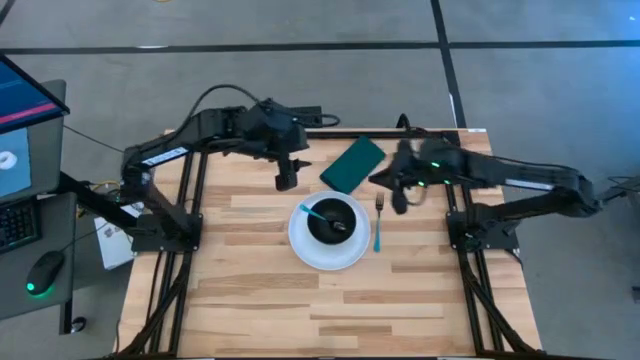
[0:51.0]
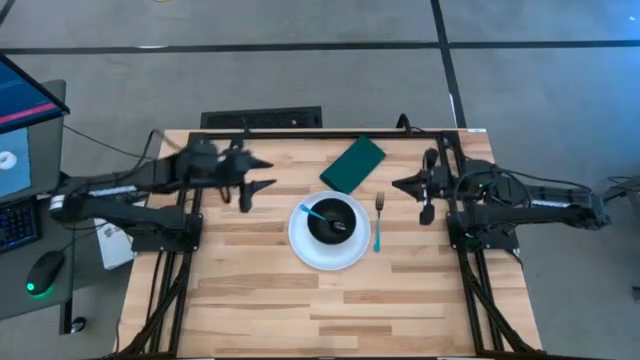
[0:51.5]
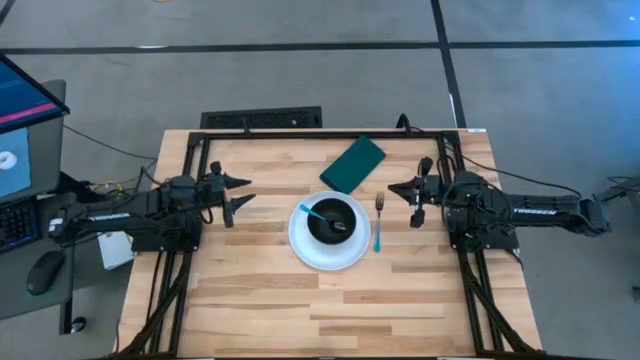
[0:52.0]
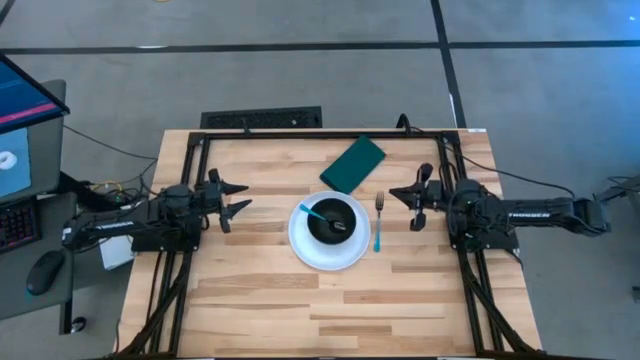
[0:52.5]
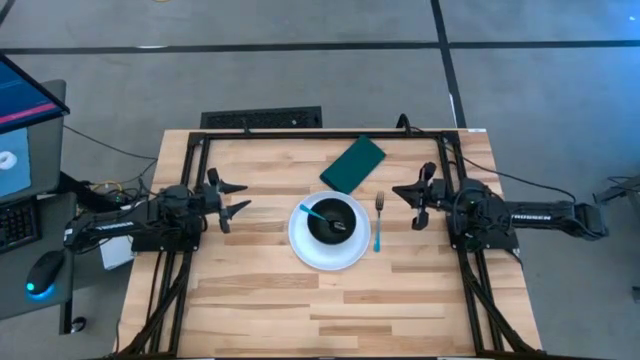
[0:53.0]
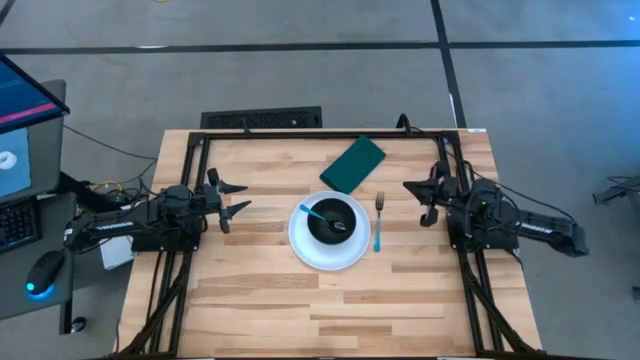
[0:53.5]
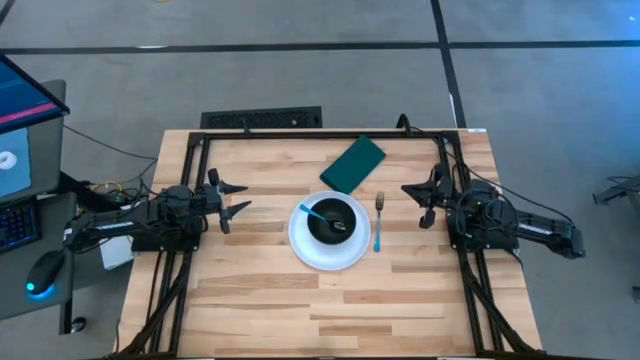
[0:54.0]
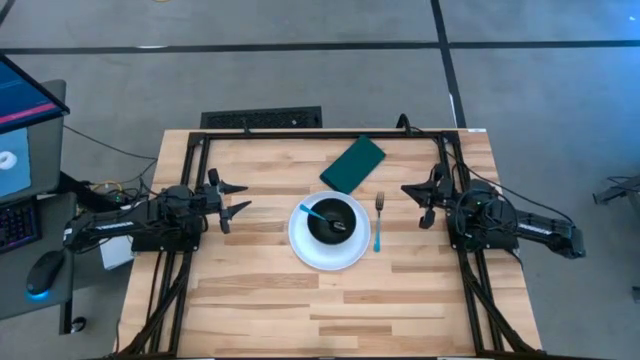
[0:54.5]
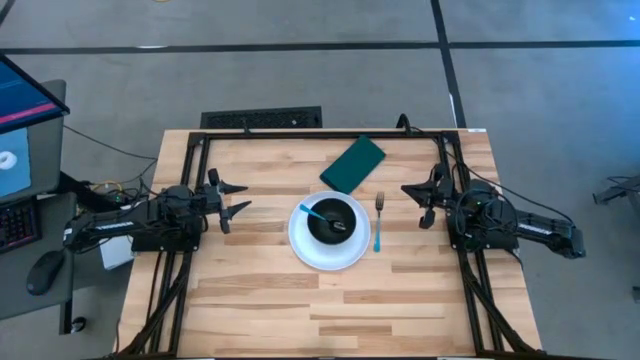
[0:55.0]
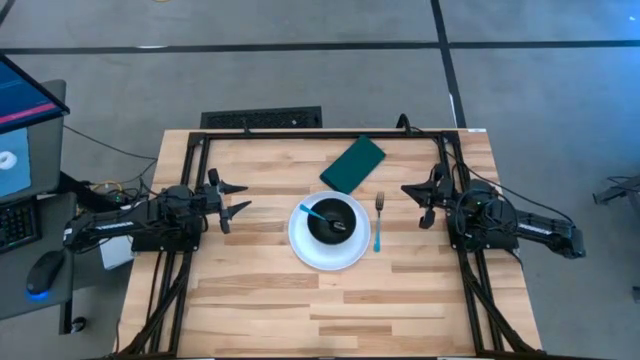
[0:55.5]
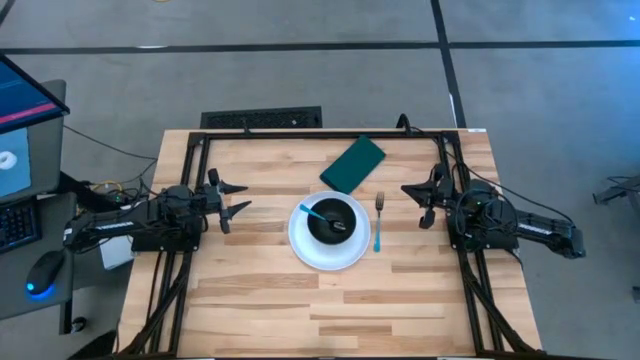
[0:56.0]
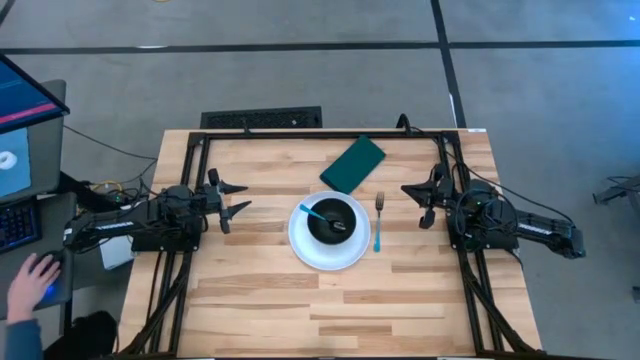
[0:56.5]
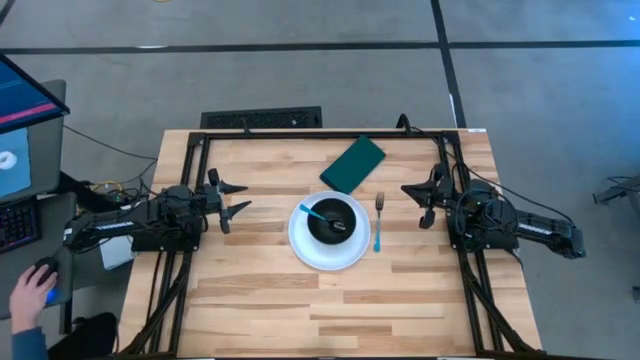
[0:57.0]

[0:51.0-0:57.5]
Task: Set table place
Return to Home Position

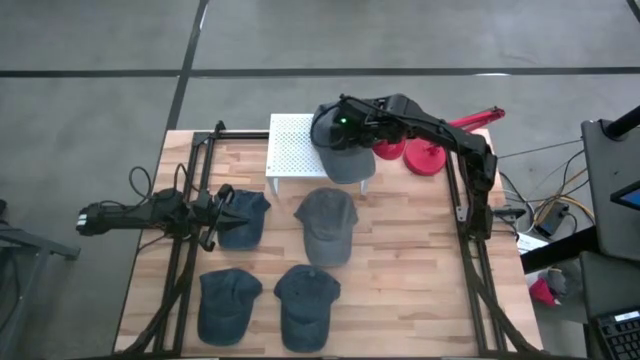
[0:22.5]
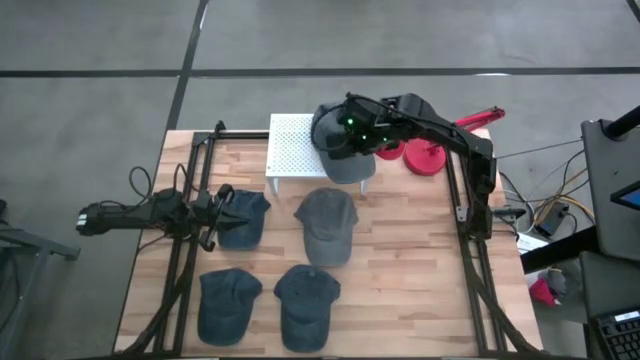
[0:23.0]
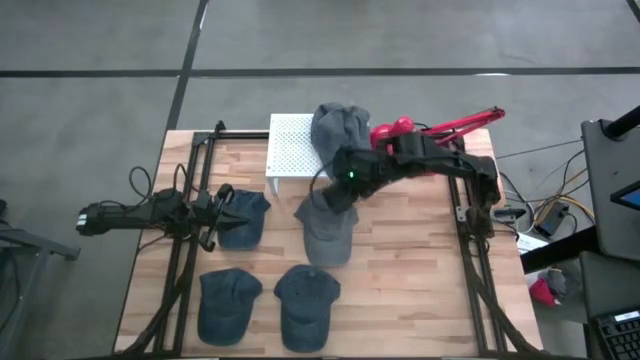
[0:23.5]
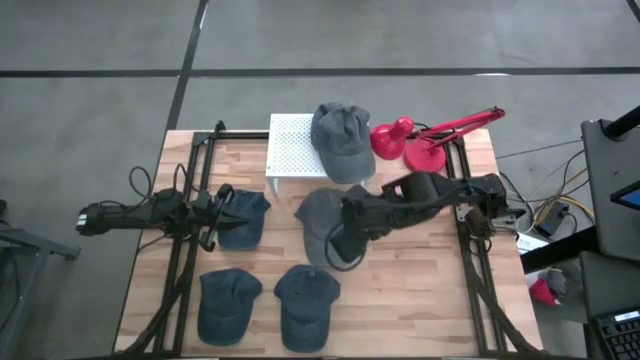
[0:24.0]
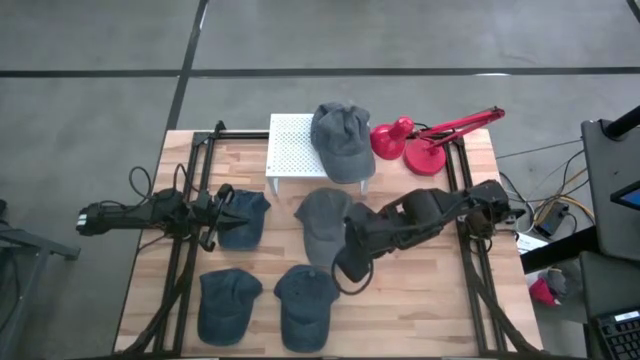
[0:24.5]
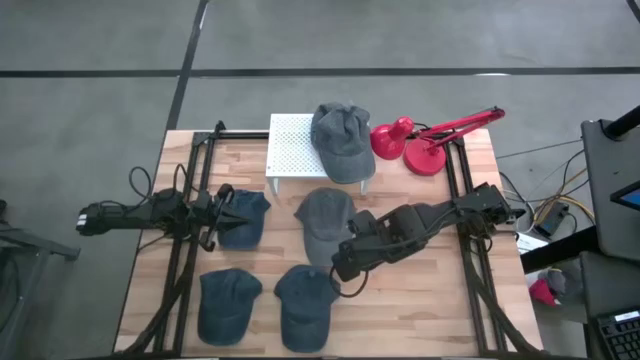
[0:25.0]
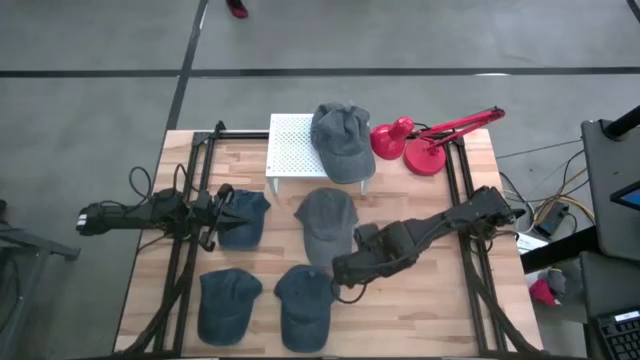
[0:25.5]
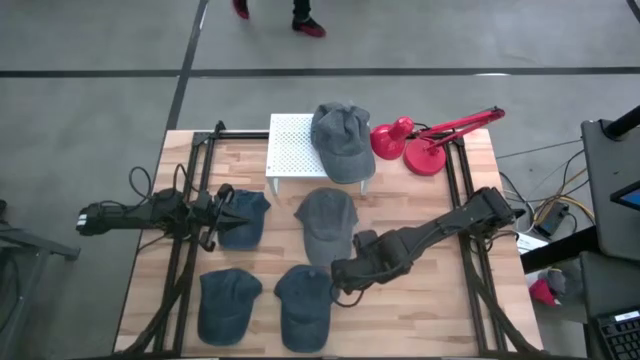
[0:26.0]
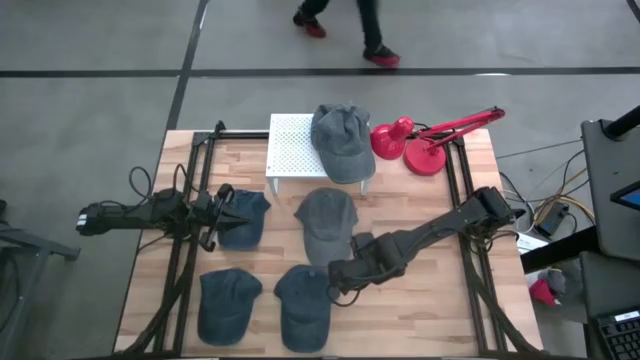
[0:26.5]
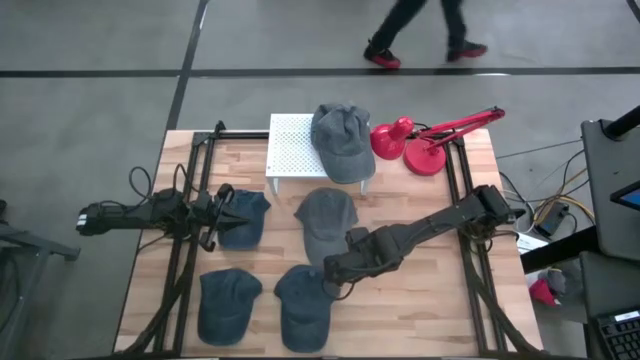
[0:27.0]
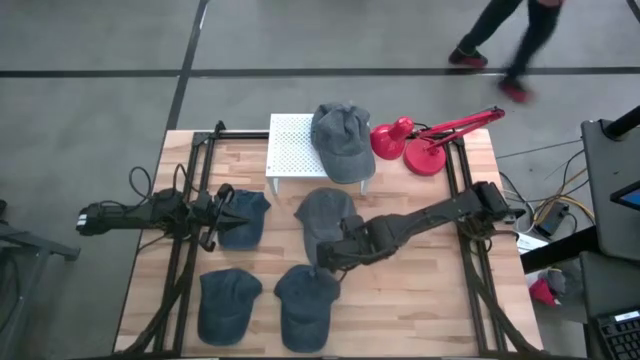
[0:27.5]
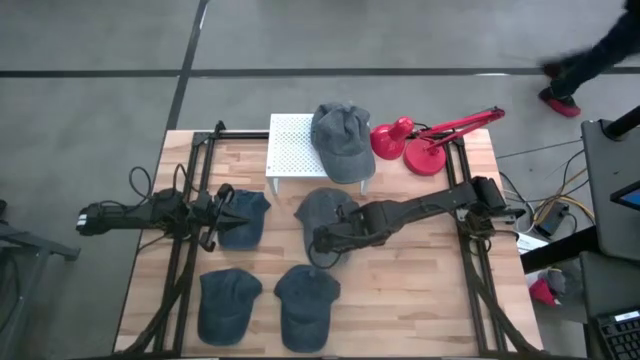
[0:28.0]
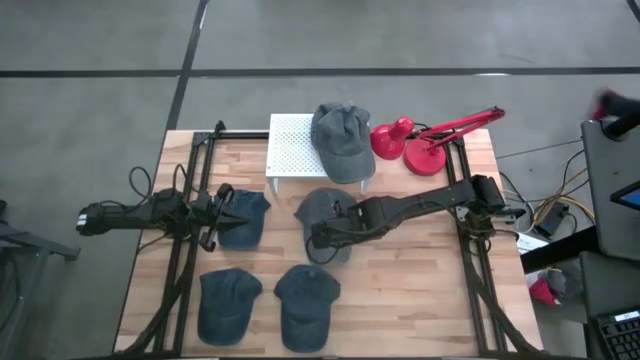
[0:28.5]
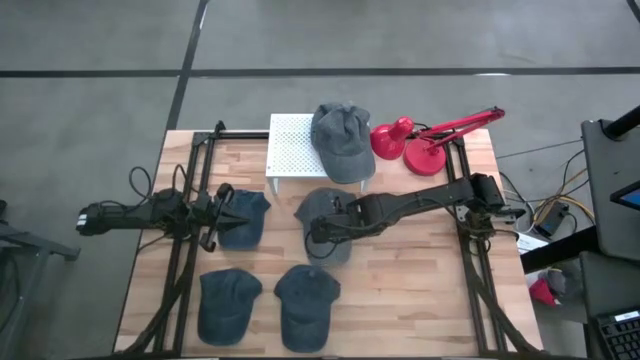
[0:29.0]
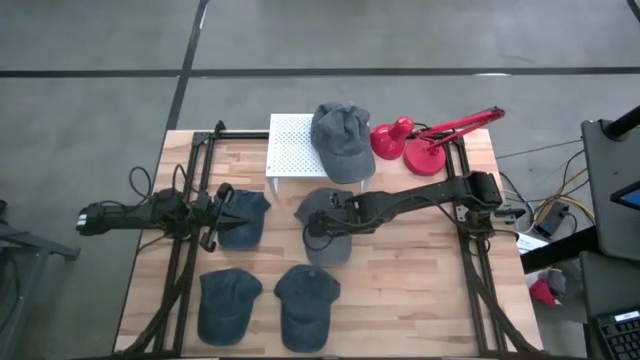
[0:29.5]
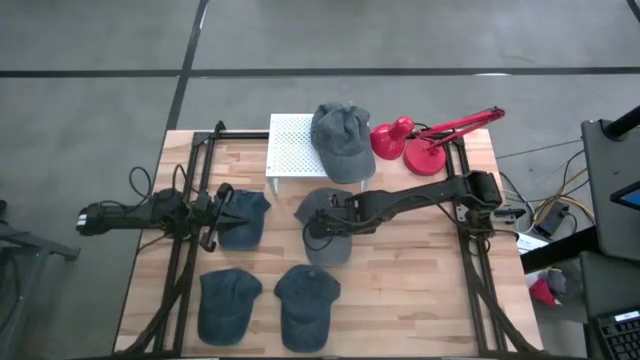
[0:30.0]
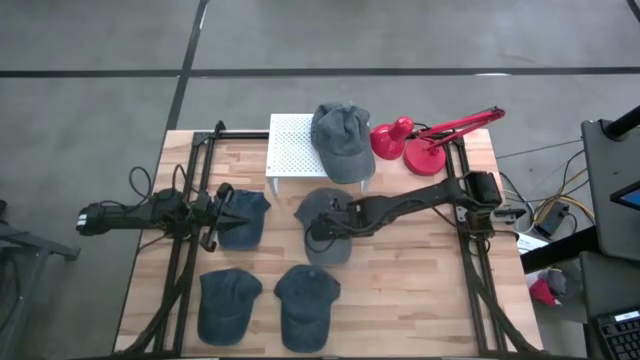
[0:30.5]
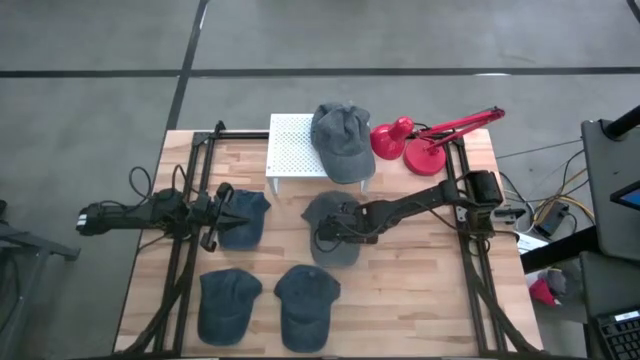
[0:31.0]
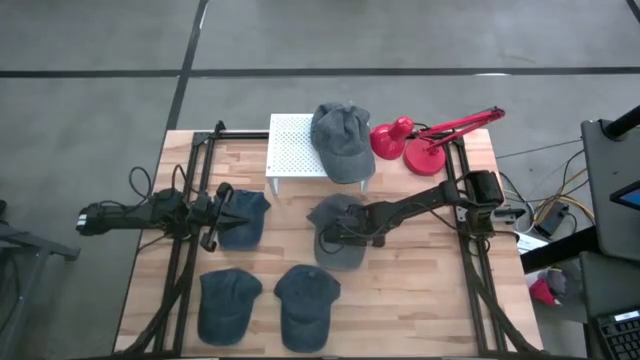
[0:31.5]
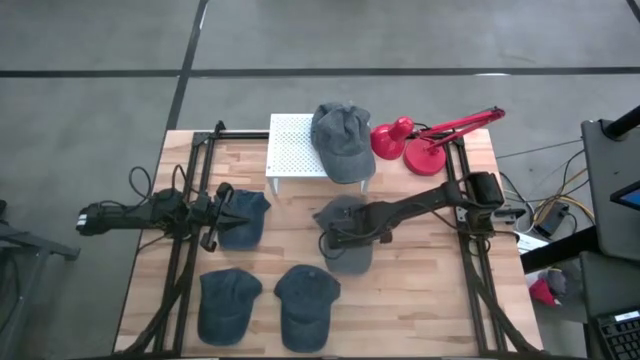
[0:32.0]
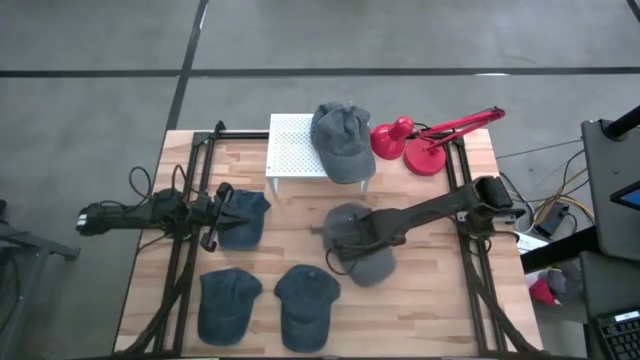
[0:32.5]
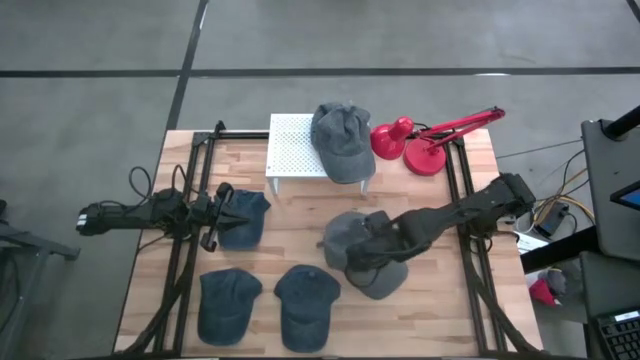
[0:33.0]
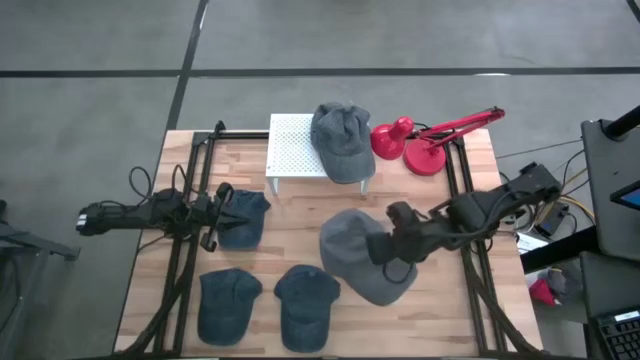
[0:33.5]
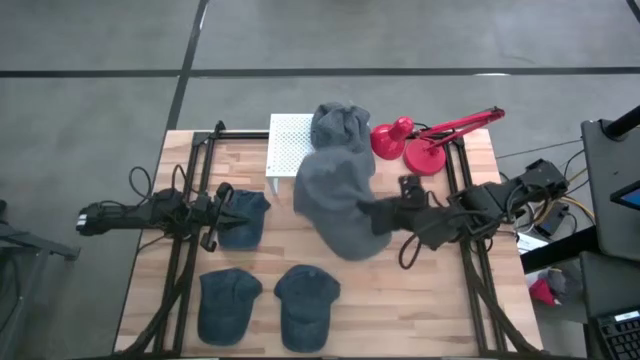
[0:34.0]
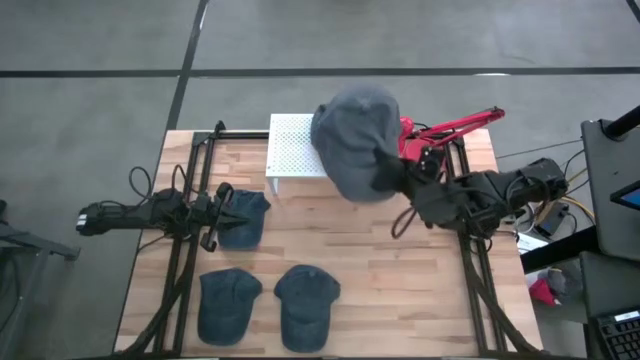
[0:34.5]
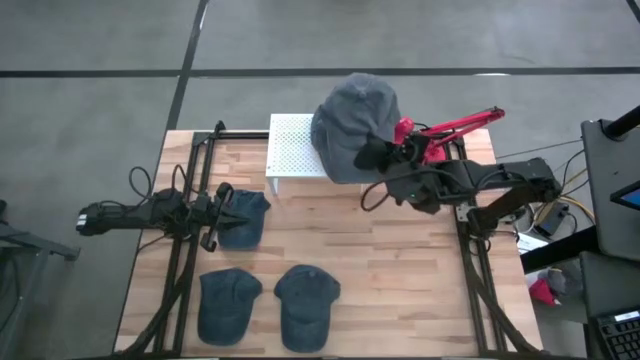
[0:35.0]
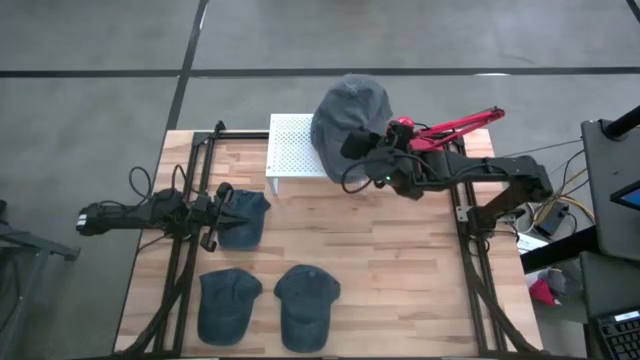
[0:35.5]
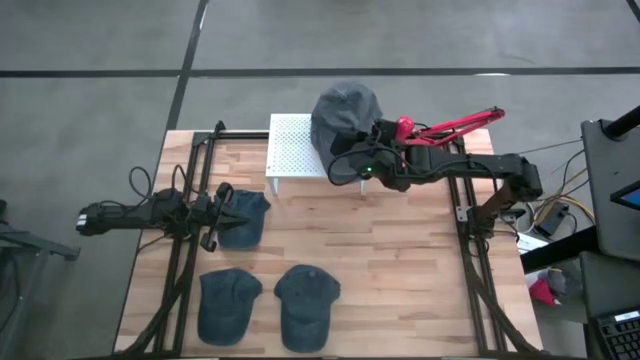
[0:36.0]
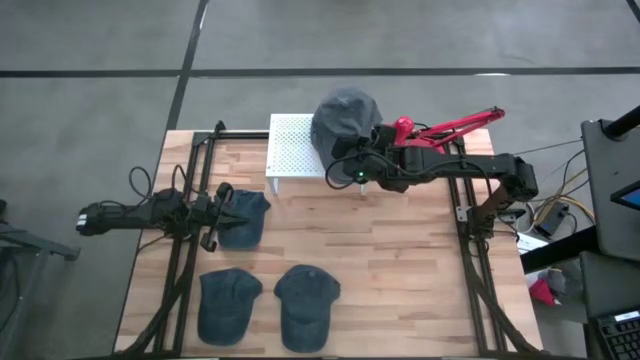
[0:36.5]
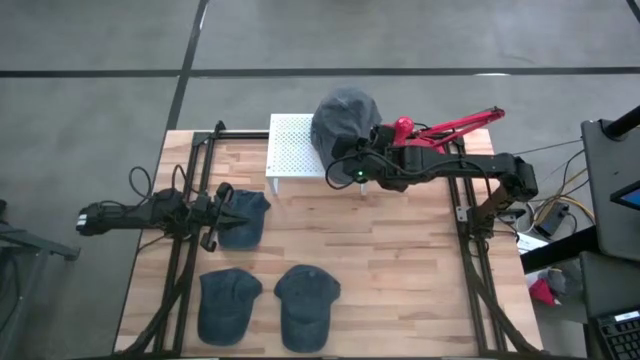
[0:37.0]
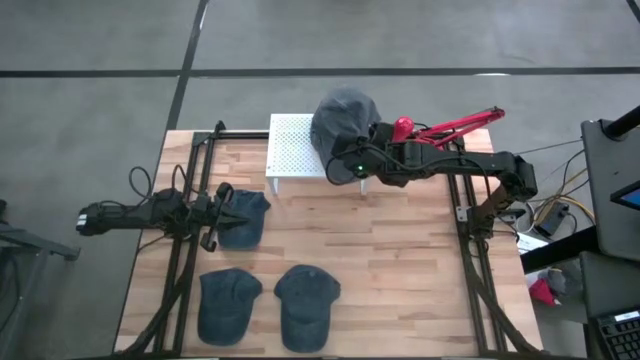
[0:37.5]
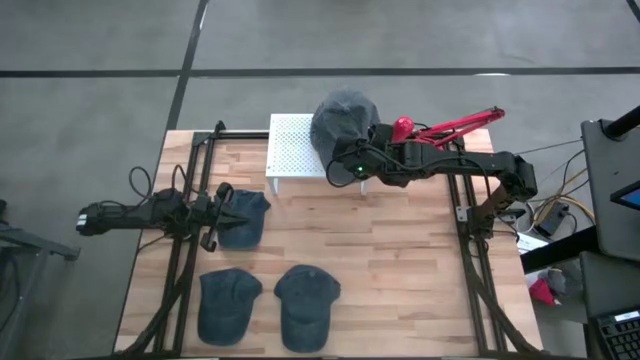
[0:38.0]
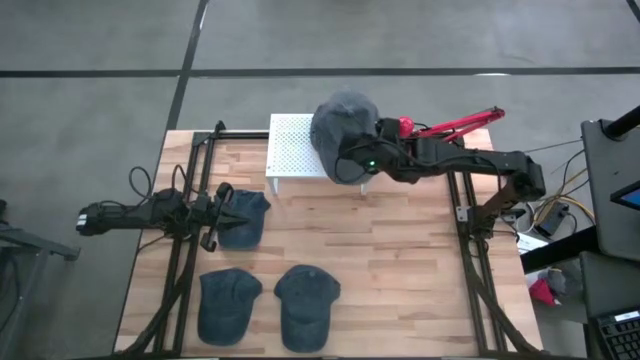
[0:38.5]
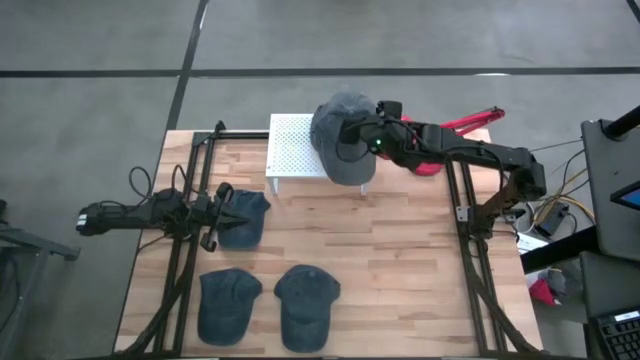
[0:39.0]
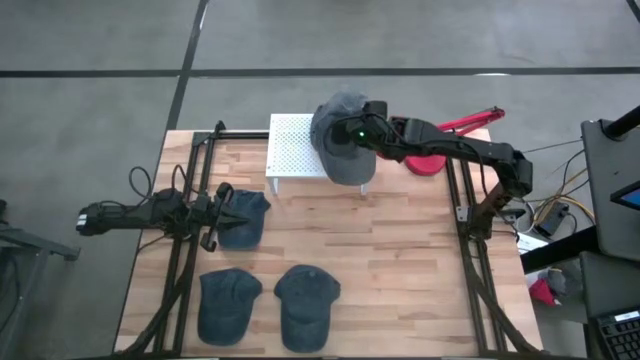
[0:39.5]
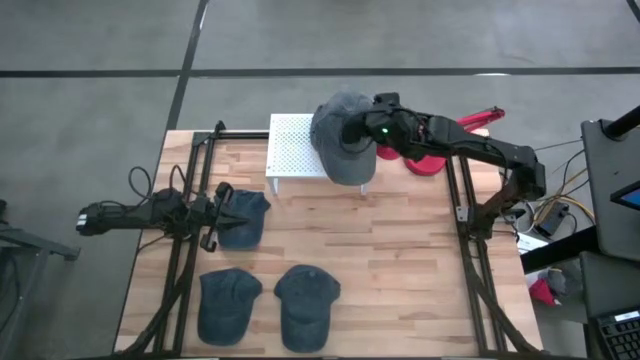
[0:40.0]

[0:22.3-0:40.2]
Task: Pick & Place hat
Stack the gray cap on the gray caps on the shelf
